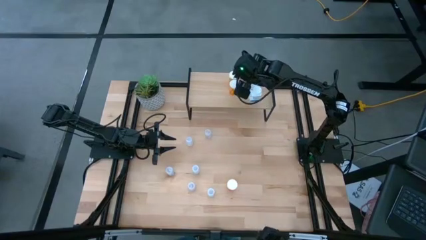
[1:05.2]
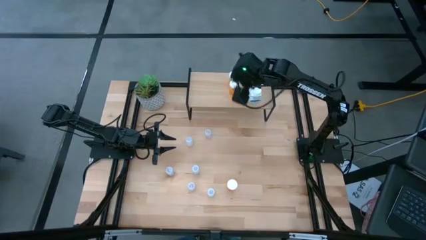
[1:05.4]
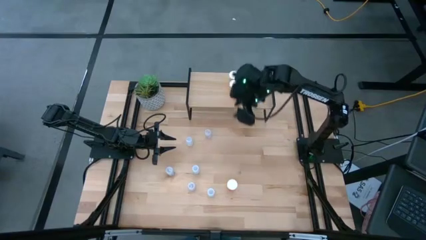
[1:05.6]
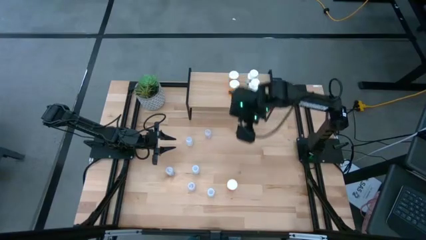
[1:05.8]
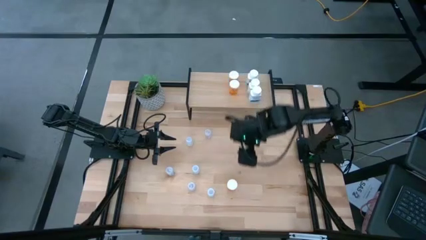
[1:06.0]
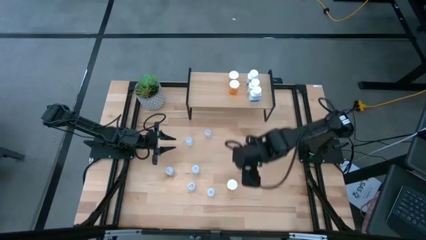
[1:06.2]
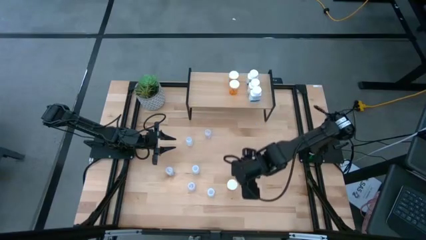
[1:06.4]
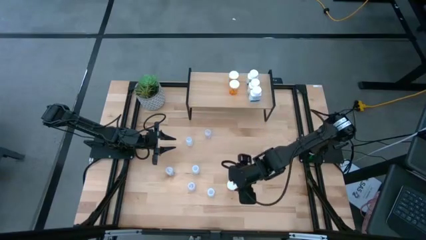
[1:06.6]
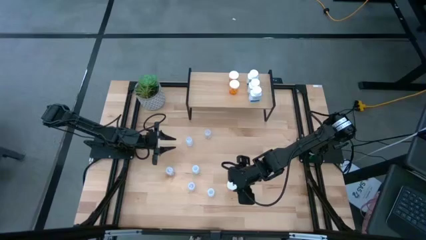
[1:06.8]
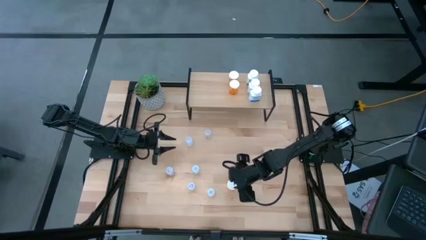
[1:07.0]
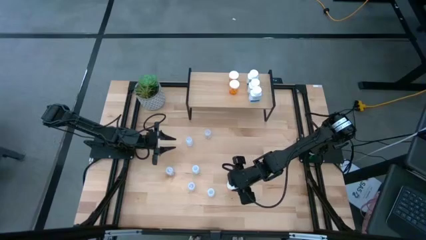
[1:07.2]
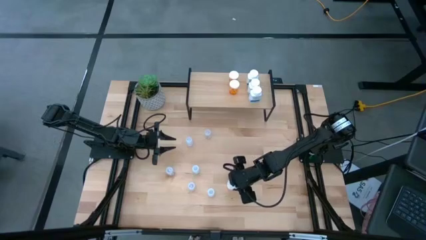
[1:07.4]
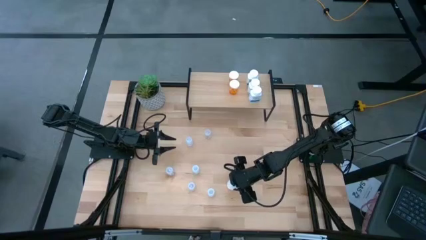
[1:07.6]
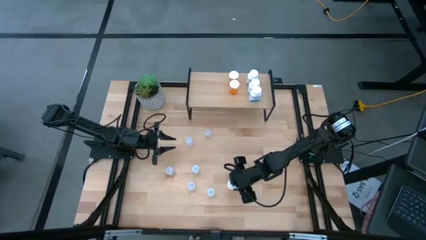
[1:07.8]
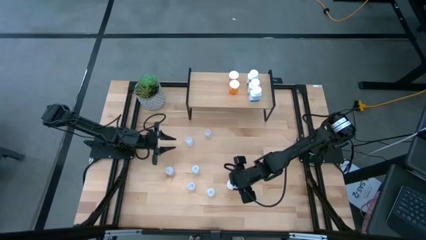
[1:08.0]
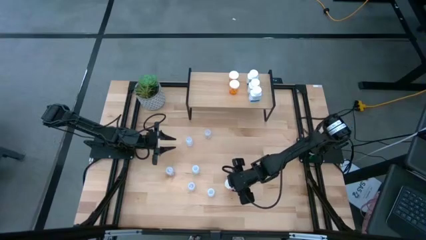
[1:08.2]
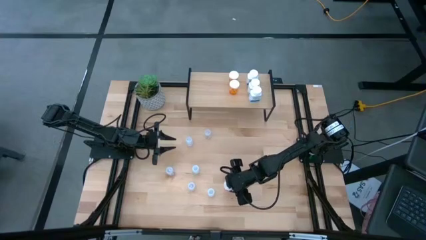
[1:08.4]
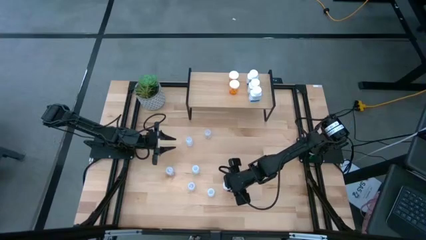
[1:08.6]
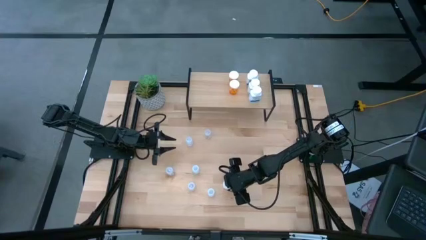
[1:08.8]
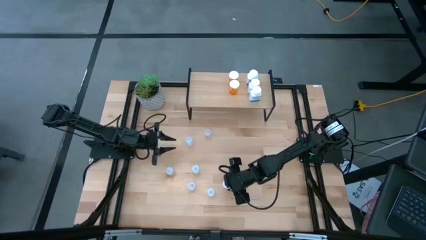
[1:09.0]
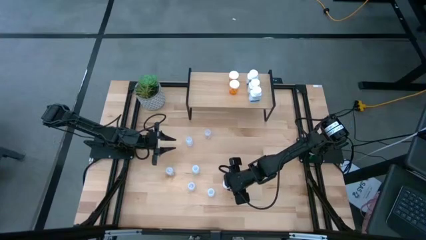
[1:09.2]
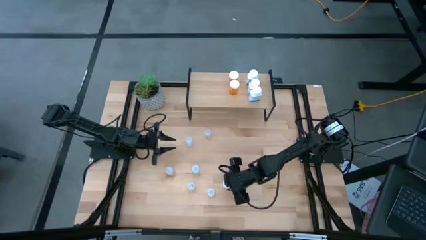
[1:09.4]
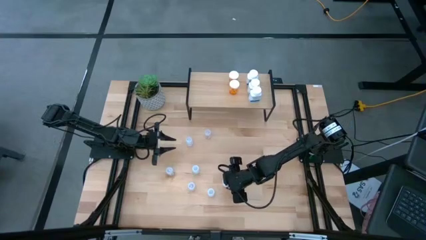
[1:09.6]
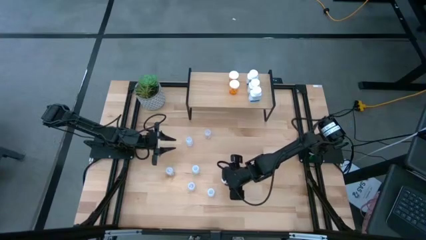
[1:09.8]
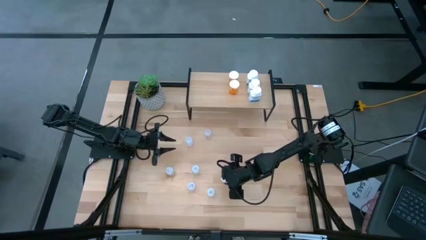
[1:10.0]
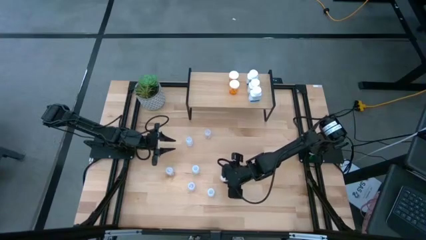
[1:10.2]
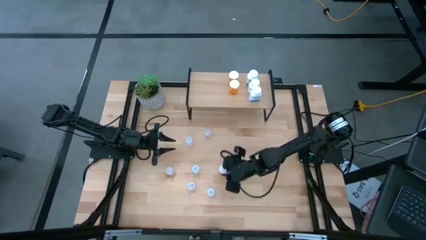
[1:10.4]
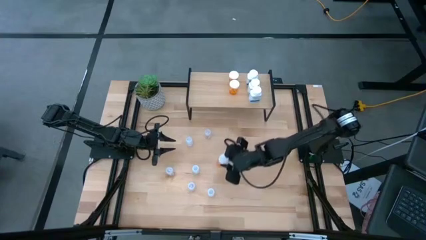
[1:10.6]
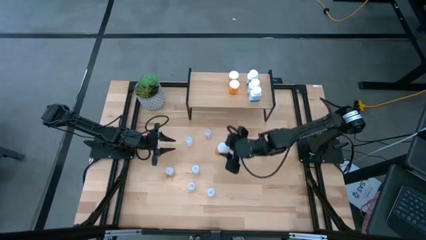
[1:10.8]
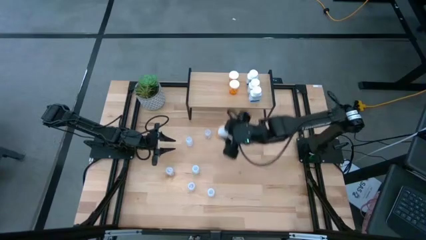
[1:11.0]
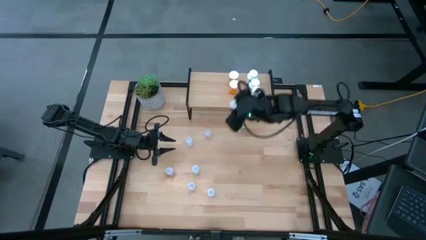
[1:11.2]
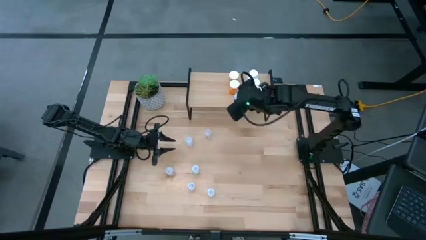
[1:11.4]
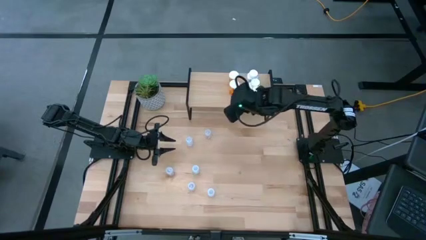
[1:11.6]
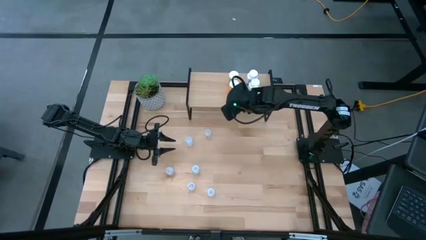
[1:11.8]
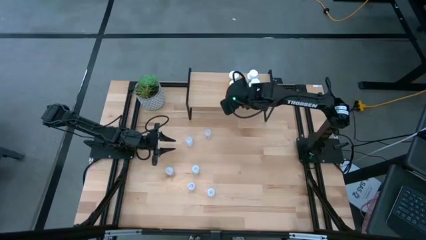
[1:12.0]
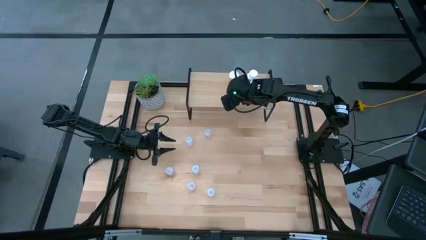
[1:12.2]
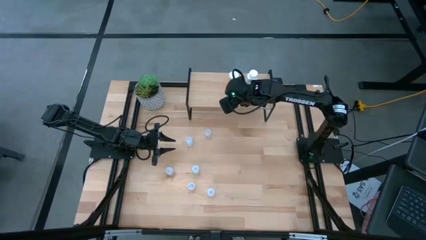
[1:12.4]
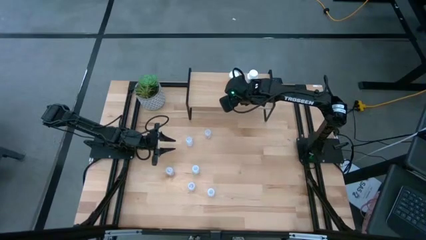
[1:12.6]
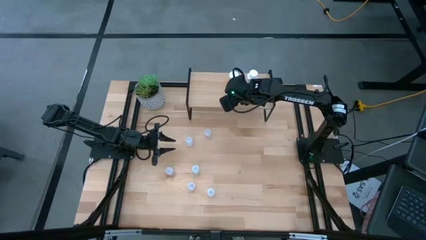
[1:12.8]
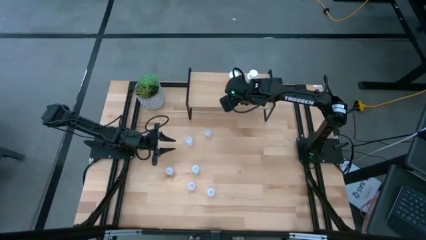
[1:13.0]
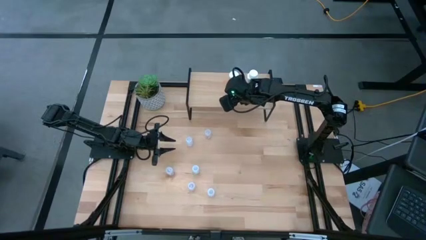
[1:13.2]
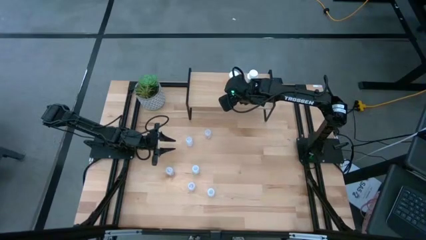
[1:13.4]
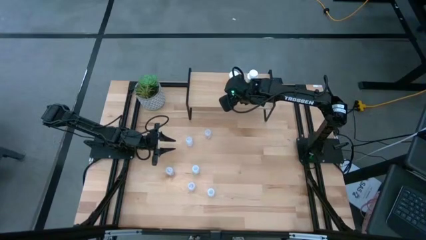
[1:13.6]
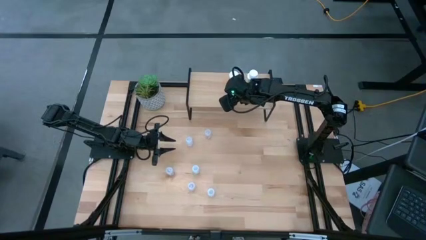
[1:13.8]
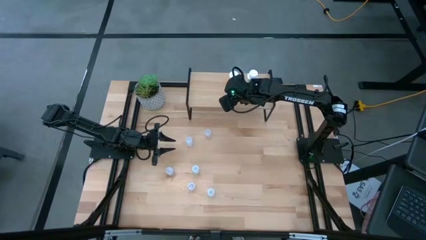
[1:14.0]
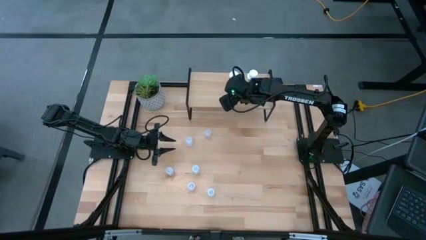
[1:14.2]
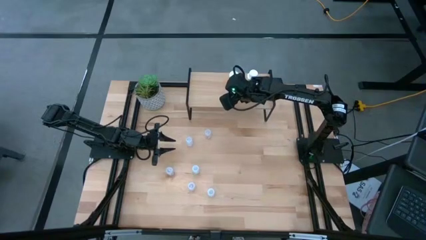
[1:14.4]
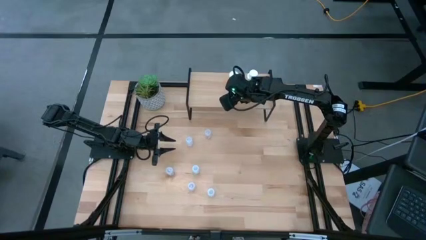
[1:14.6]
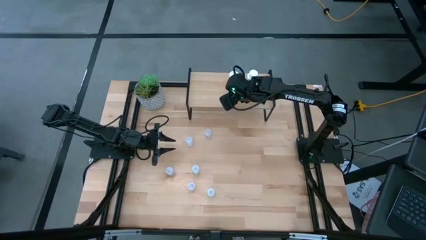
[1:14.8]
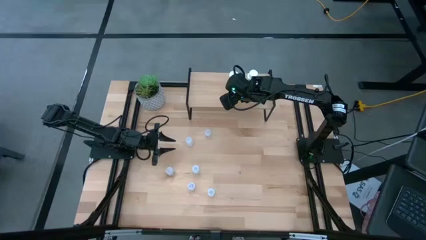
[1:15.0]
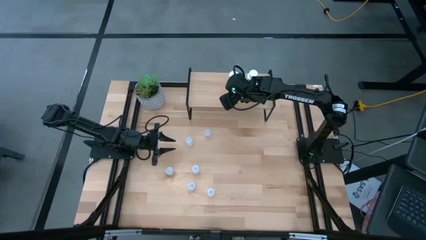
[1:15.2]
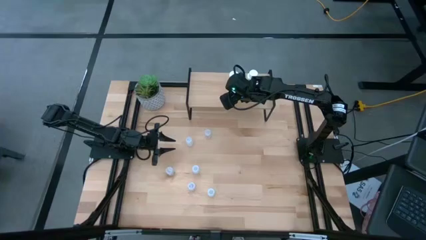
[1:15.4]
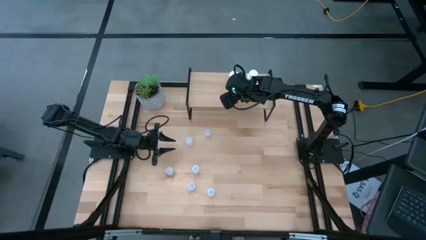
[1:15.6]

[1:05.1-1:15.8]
Task: Pick and place medicine bottles onto shelf by color
Put the orange pill bottle on the shelf aligned with the other orange pill bottles

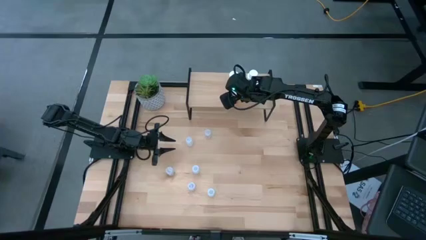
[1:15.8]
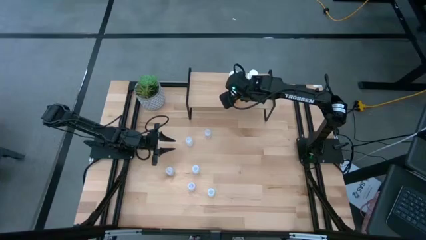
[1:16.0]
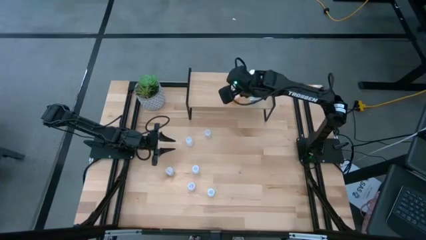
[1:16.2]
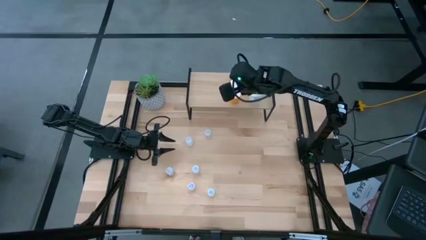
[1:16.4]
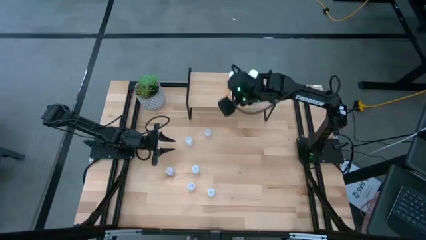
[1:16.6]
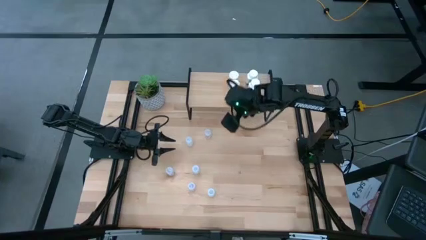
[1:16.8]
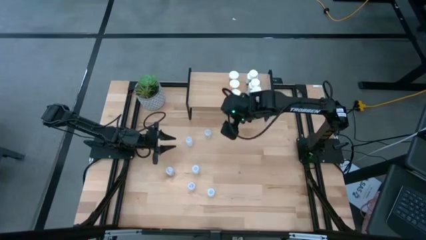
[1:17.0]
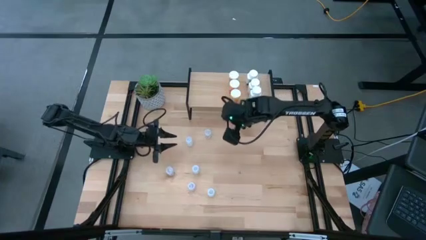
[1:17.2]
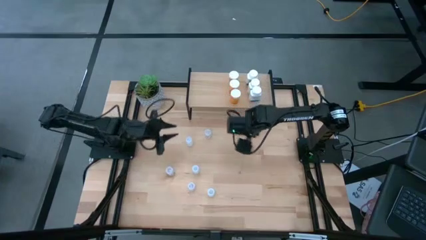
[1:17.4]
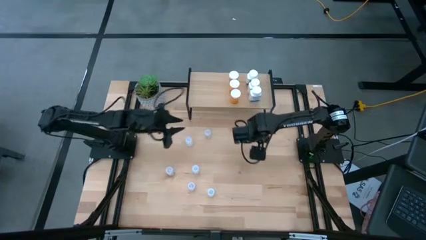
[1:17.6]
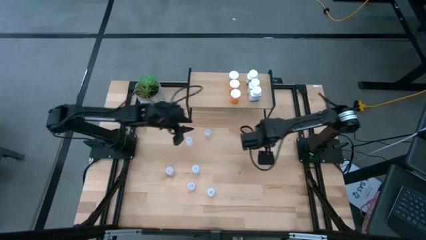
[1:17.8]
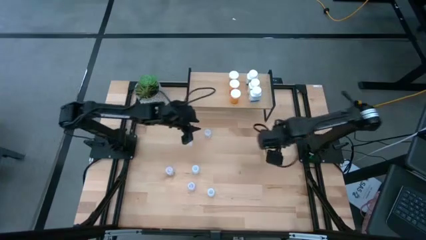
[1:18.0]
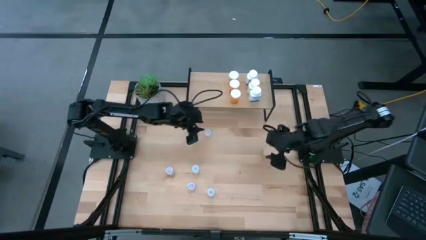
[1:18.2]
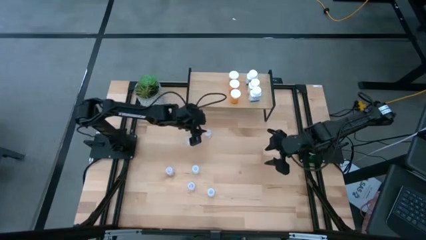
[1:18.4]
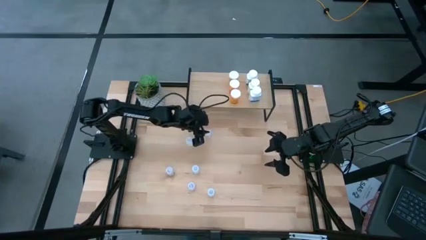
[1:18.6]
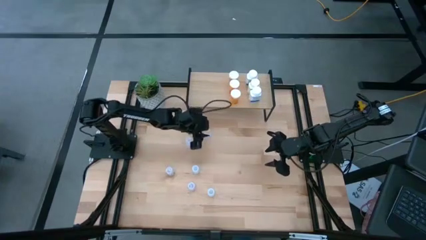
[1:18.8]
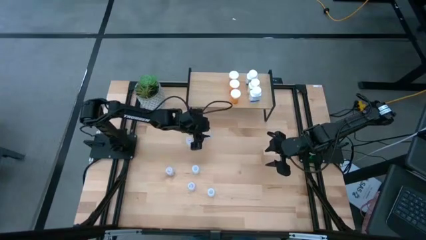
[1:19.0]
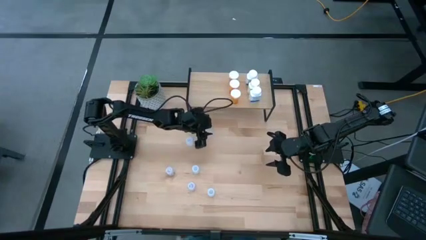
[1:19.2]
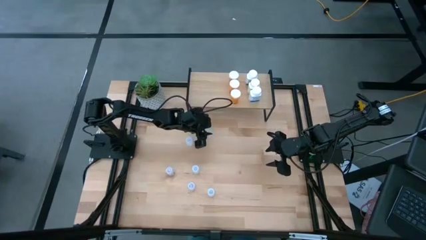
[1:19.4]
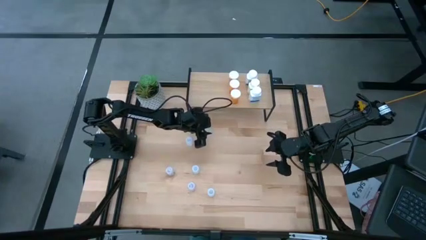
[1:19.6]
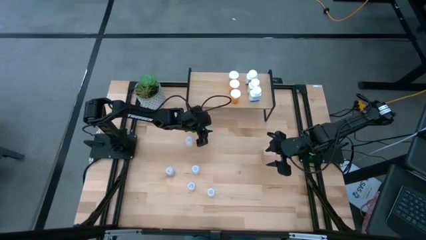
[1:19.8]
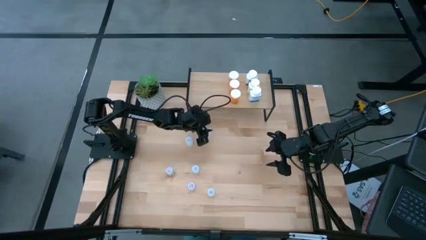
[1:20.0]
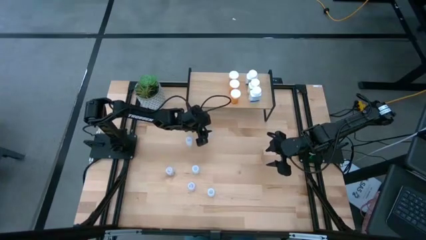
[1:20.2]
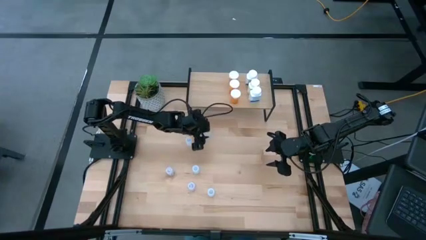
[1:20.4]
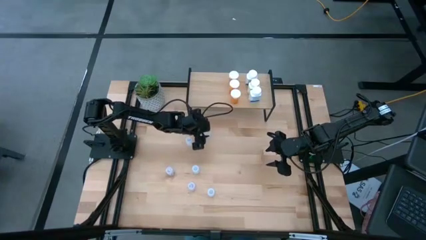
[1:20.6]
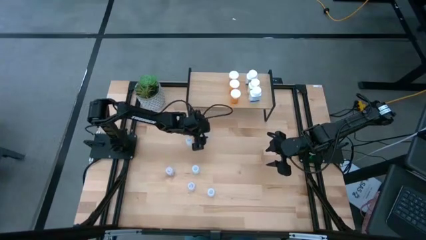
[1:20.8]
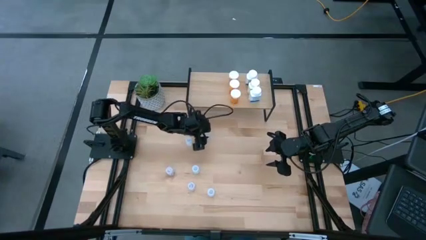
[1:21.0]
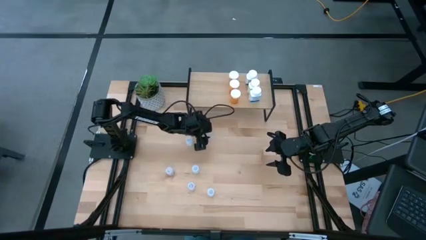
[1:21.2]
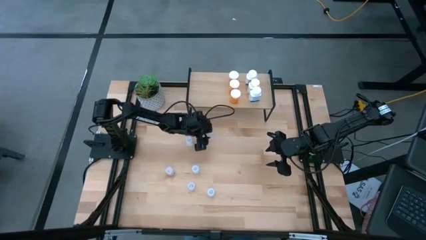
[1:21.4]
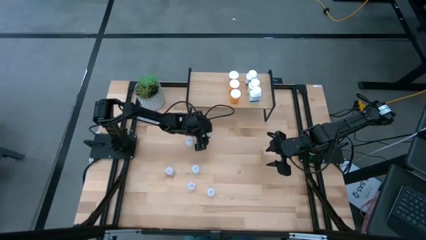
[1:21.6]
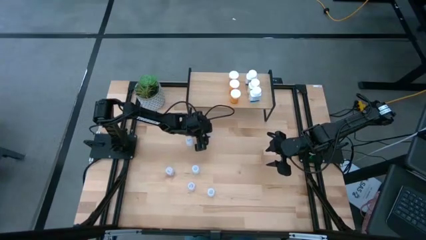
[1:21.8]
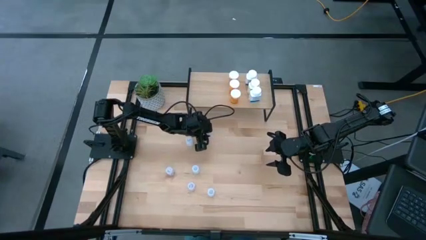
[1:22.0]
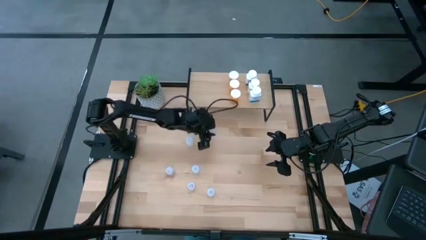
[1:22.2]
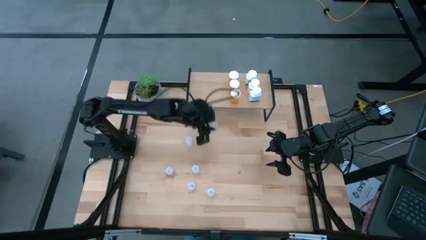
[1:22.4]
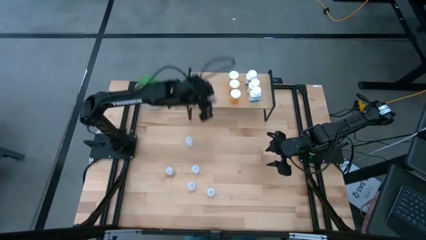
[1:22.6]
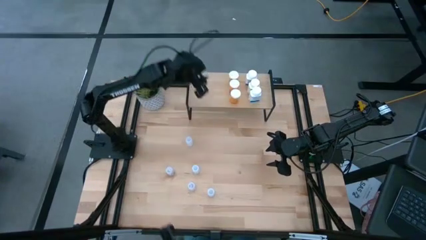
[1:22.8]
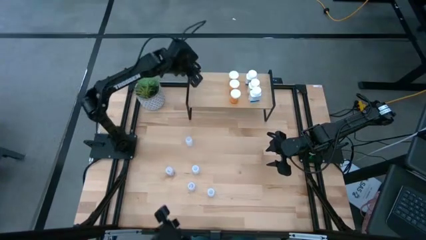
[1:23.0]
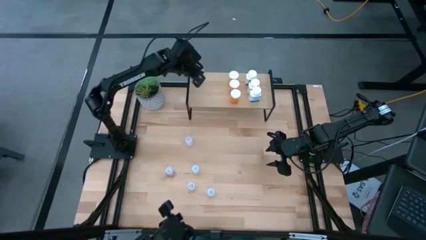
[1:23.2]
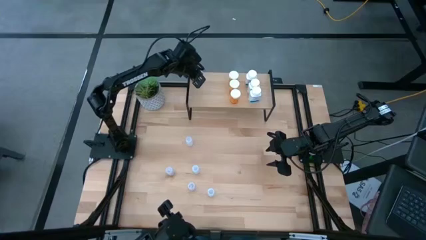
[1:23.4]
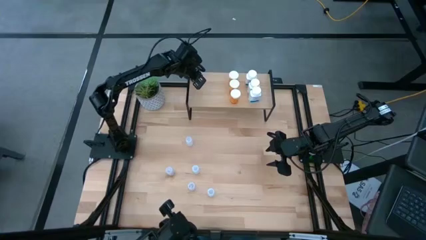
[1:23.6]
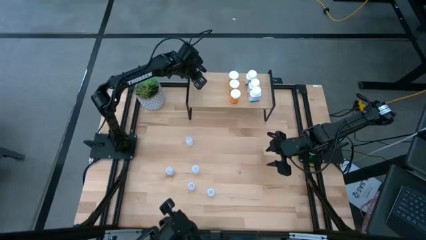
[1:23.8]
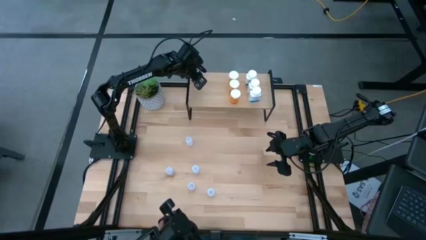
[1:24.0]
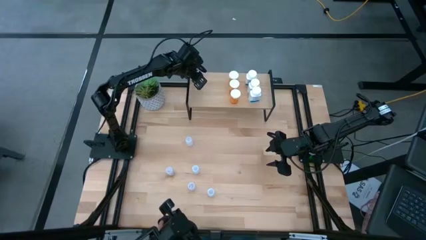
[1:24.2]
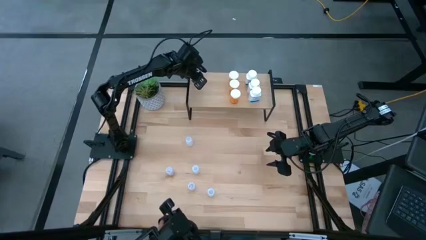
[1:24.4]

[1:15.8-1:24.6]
Put the top transparent pill bottle on the shelf
